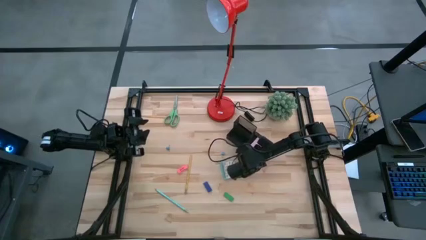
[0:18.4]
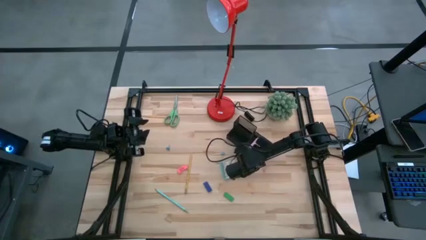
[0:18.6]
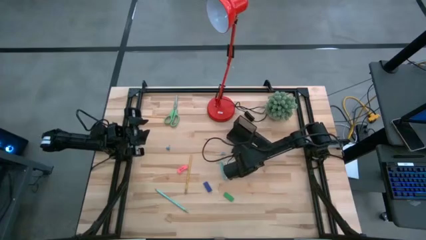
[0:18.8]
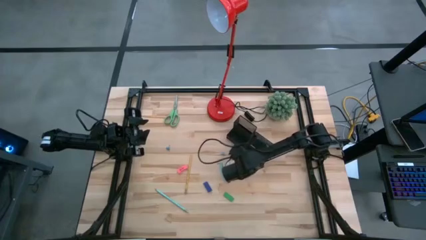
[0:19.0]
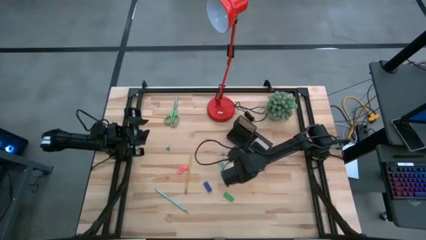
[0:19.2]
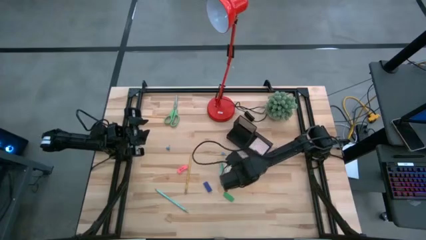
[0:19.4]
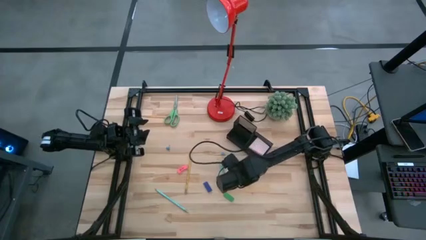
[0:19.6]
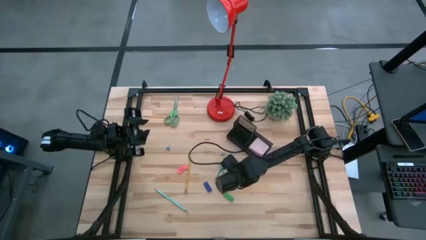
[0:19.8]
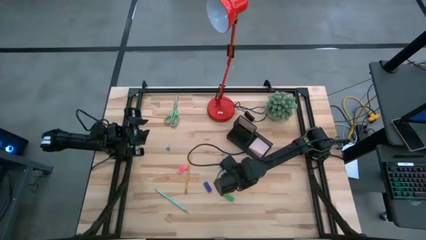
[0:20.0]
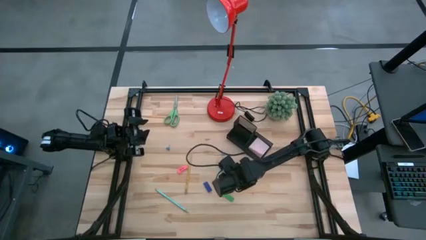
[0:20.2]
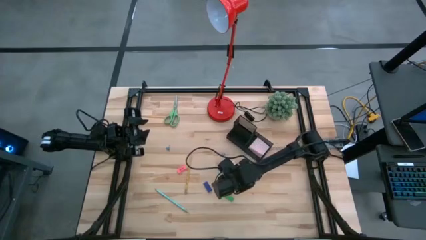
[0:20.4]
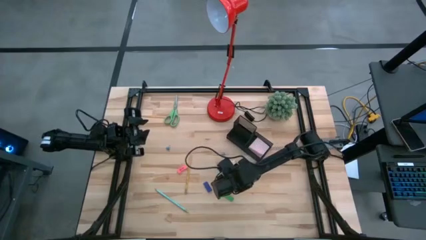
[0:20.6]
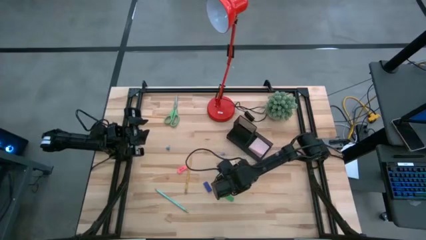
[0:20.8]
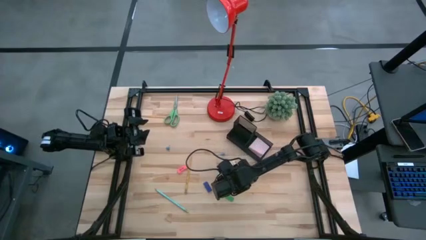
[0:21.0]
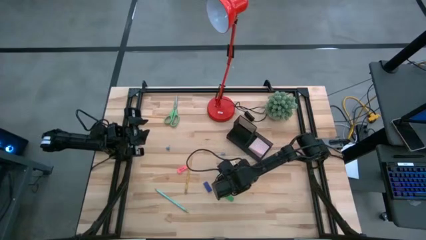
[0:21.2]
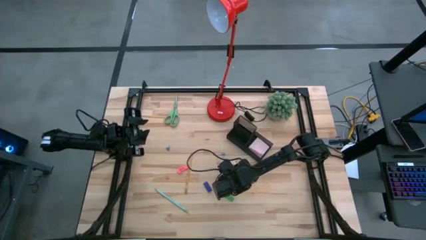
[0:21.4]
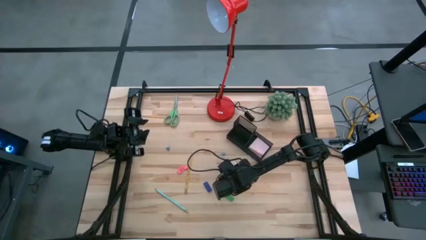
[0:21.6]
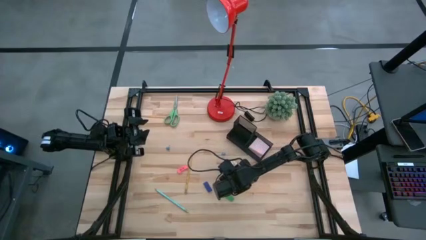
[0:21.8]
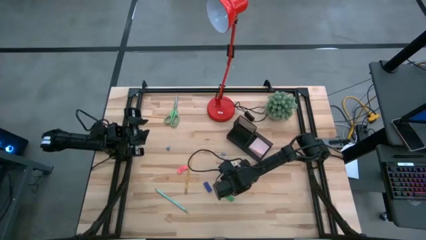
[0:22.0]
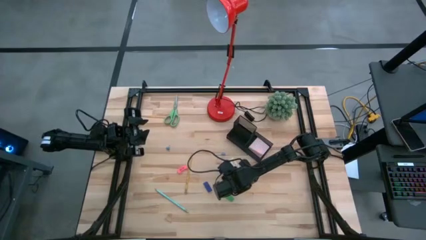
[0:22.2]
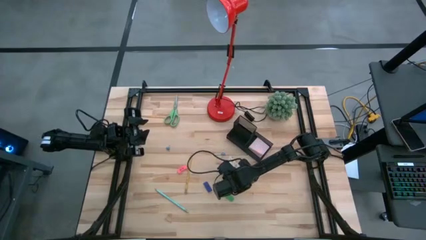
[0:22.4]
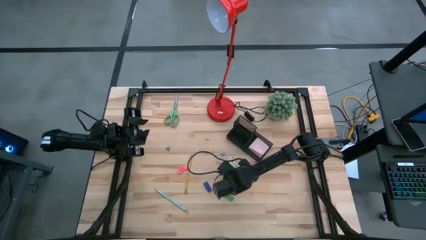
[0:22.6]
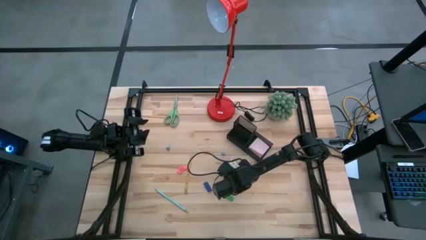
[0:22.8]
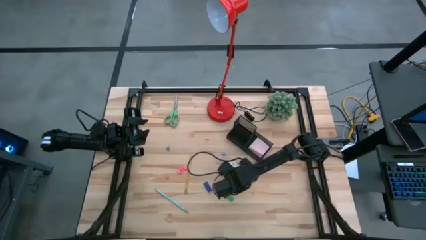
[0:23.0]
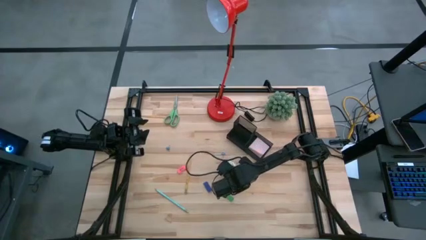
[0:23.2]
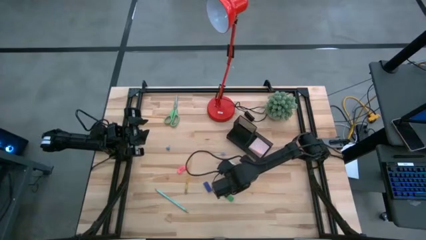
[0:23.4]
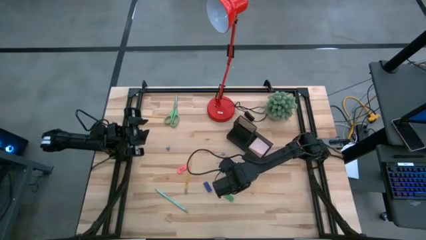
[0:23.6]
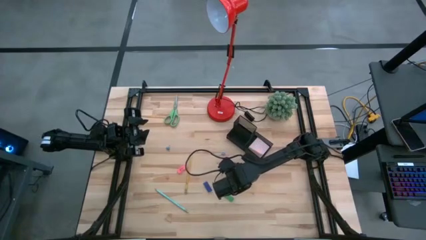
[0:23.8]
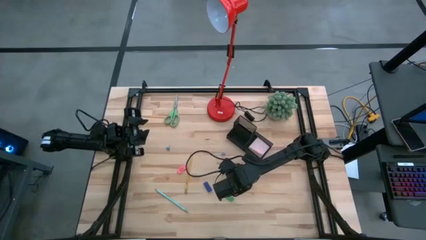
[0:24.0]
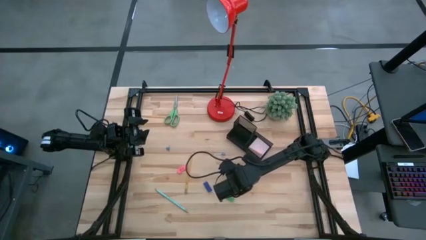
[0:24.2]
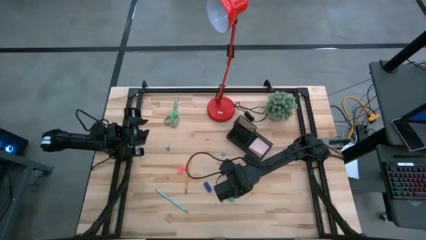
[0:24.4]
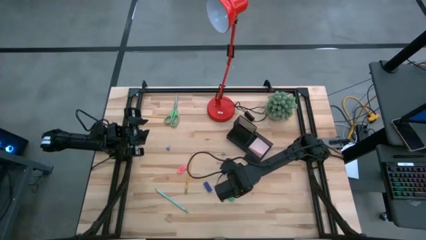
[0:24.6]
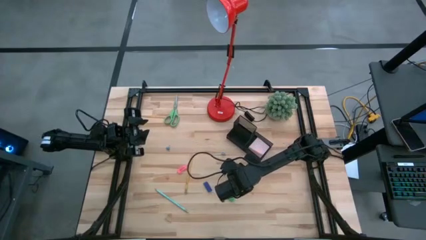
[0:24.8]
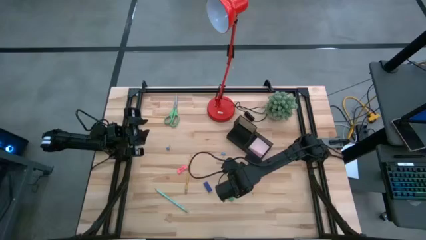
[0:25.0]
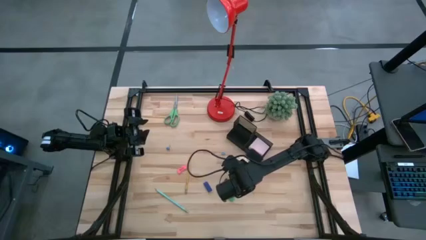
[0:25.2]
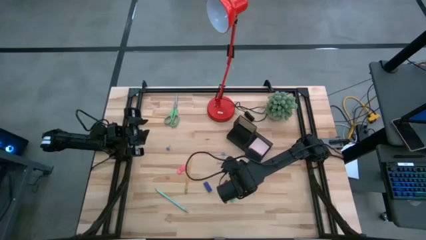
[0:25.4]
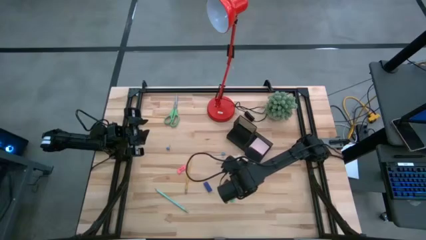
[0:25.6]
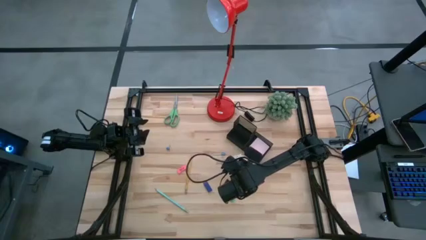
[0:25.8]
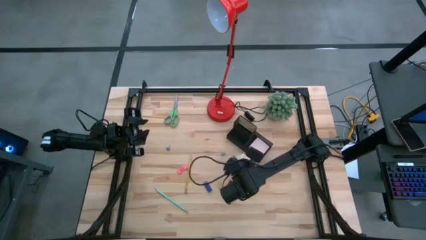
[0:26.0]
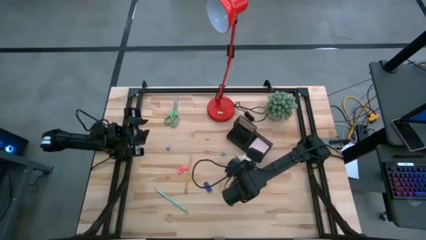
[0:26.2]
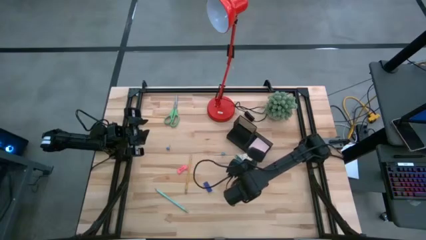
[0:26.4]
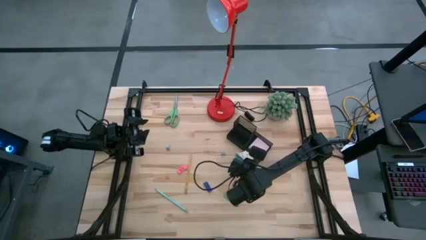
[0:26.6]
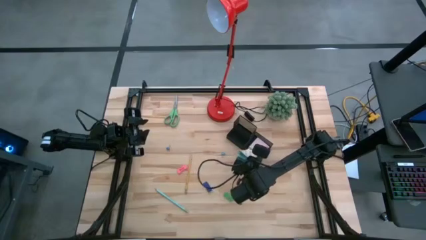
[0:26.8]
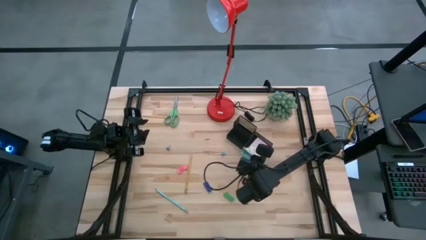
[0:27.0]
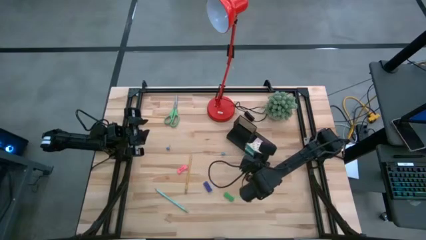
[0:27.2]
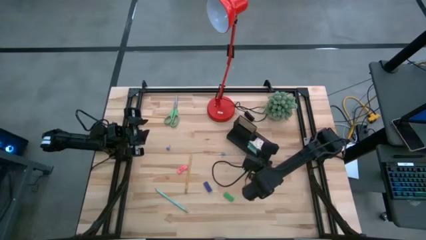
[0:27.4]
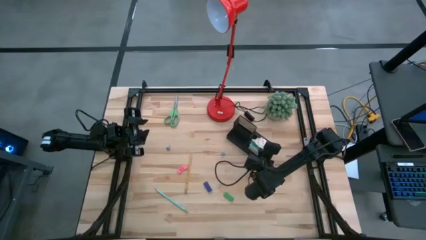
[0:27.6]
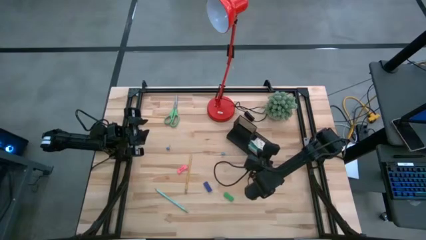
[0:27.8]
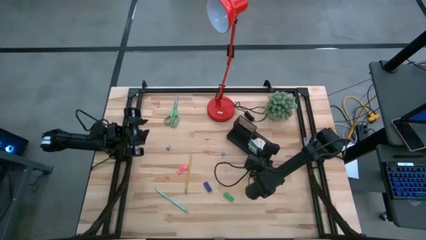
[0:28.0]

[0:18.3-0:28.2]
Task: Pick and place office supplies into organizer
Put the blue sticky note into the desk organizer

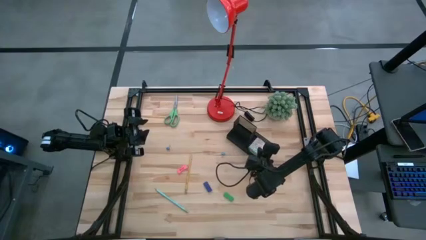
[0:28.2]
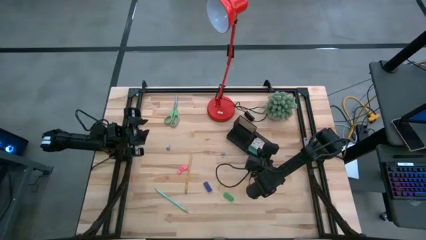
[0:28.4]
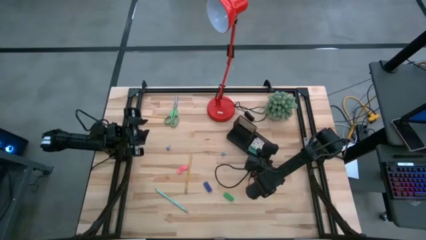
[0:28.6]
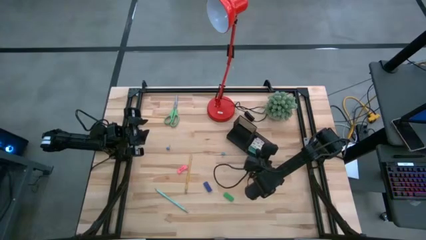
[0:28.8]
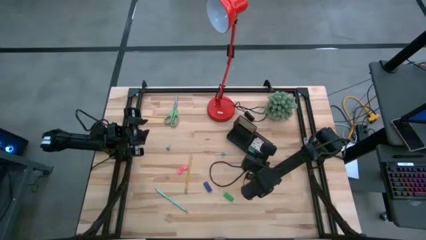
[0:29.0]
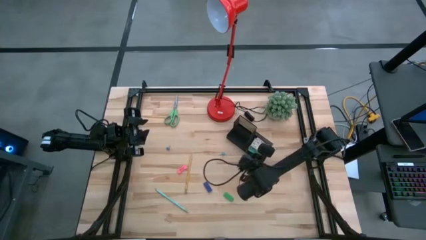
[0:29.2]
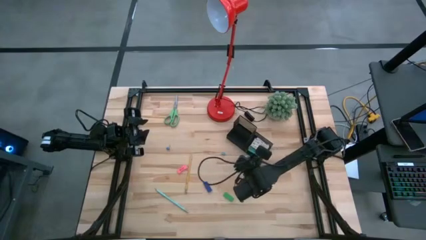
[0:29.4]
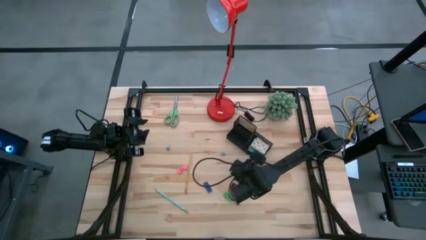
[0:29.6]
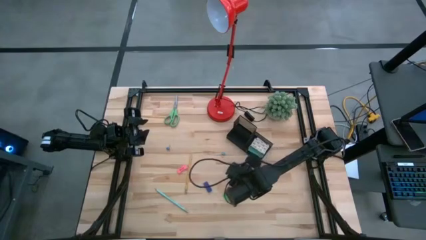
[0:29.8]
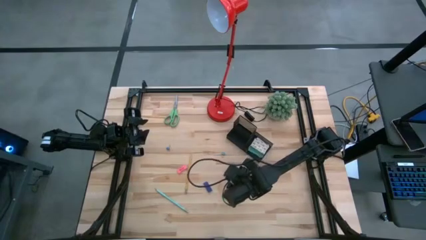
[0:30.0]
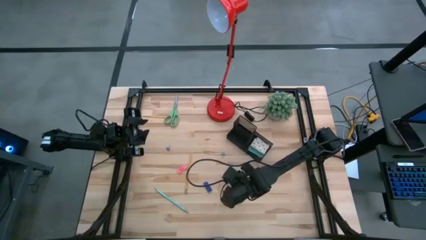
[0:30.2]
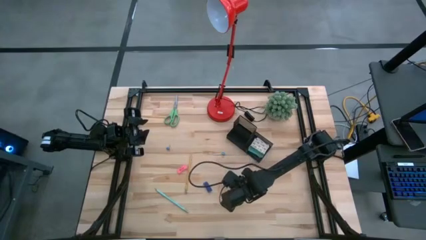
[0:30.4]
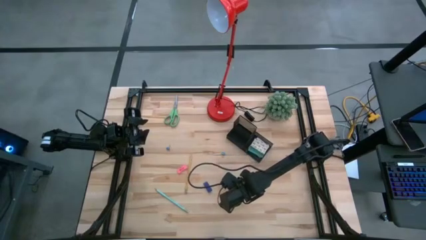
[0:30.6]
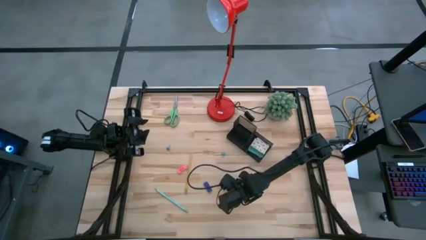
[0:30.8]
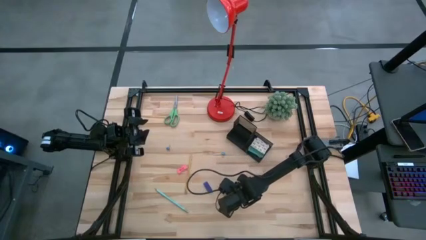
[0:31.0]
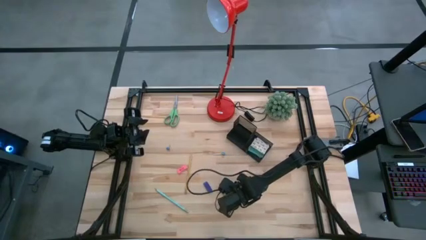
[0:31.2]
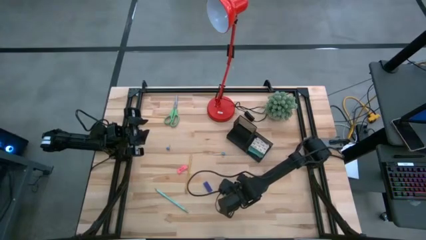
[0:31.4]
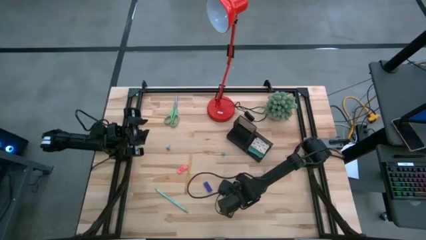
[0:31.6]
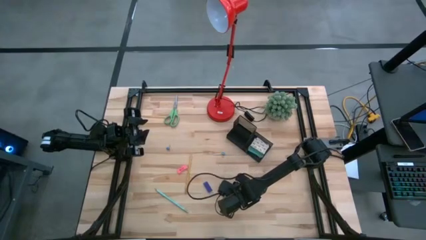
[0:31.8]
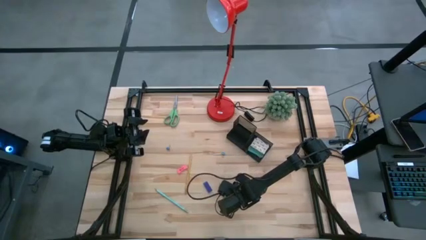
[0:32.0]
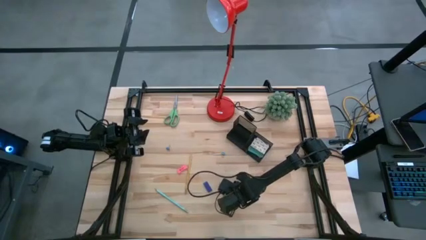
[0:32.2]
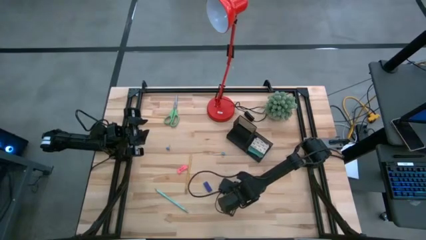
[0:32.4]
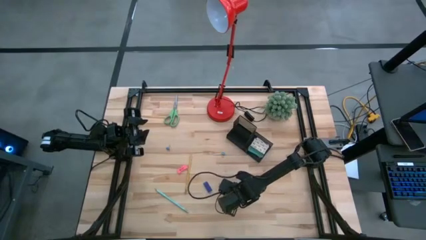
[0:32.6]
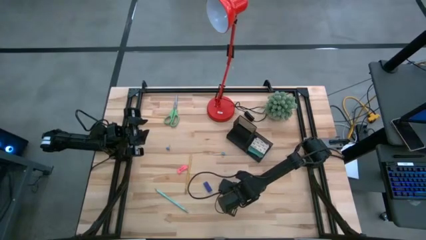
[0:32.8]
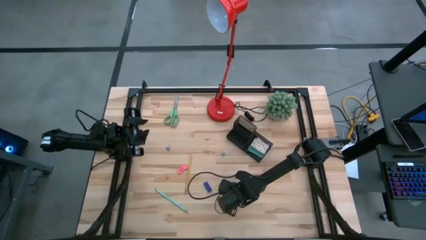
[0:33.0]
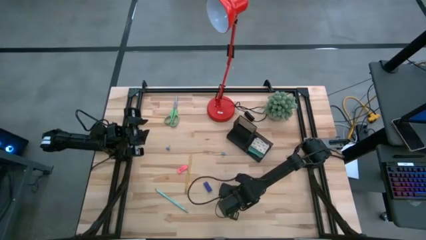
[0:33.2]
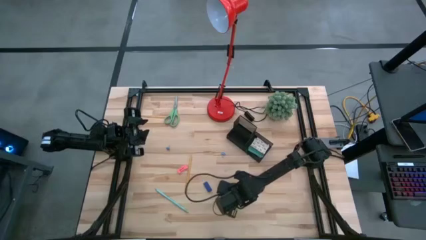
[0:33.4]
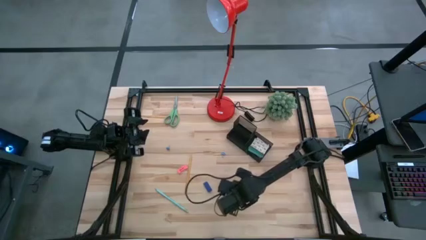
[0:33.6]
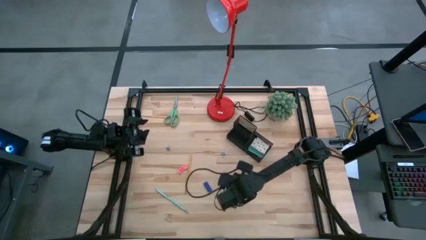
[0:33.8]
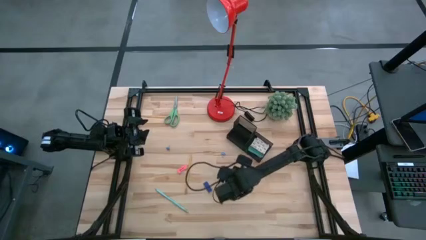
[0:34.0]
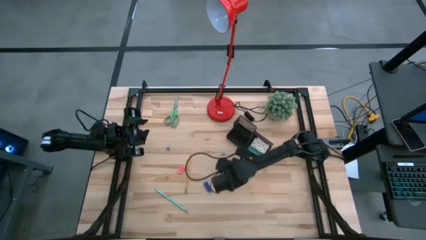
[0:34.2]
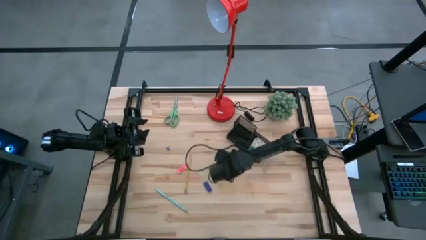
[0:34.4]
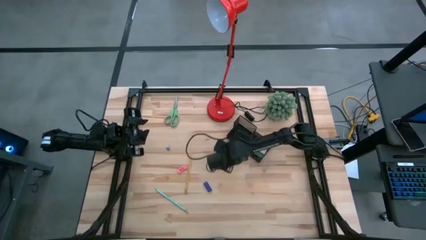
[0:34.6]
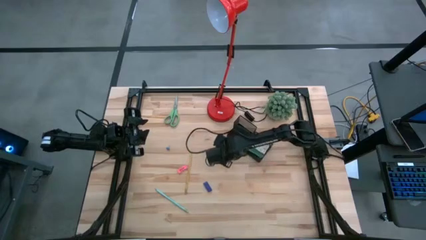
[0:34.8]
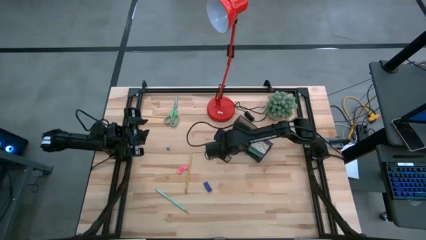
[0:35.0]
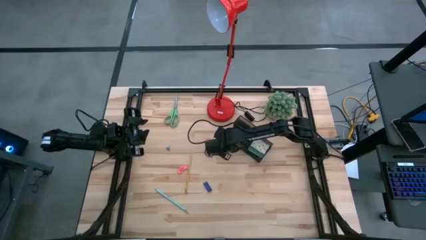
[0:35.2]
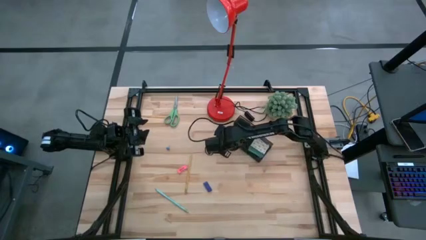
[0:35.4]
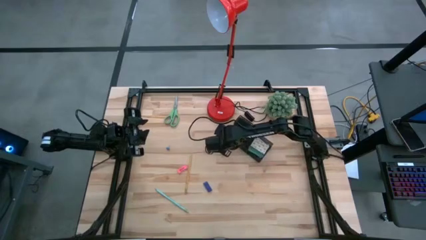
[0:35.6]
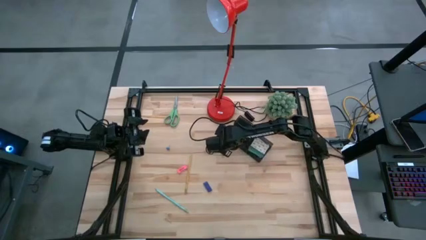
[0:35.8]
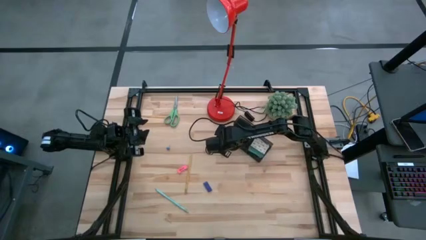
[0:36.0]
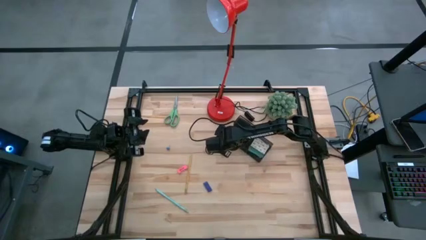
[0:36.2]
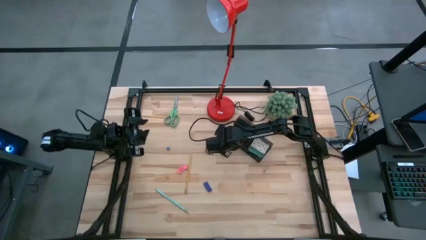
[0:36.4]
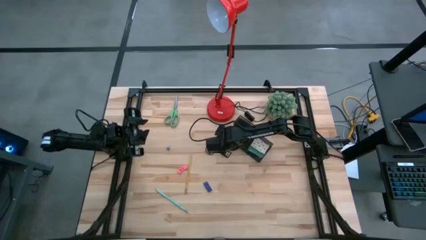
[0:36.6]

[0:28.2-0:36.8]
Put the green eraser into the desk organizer
